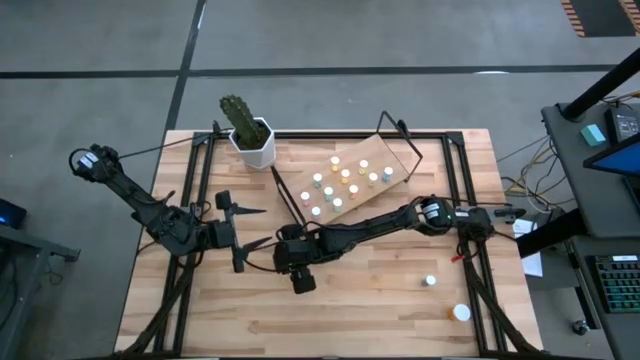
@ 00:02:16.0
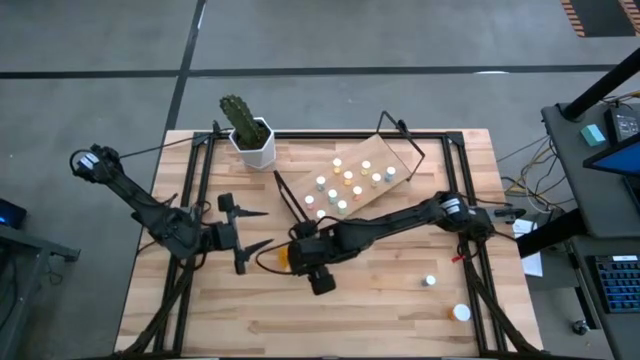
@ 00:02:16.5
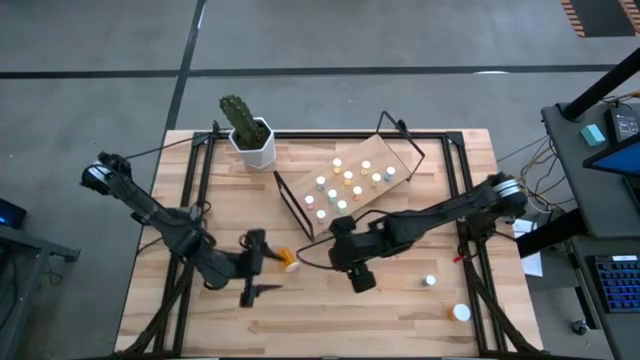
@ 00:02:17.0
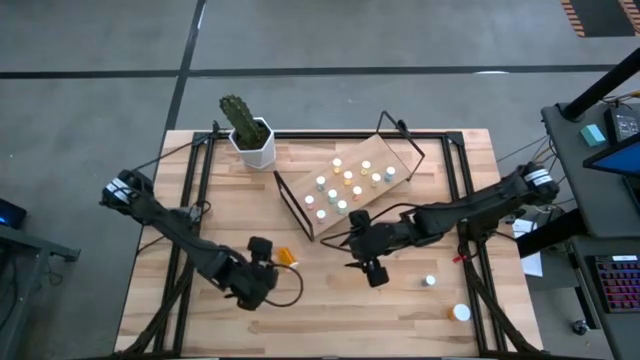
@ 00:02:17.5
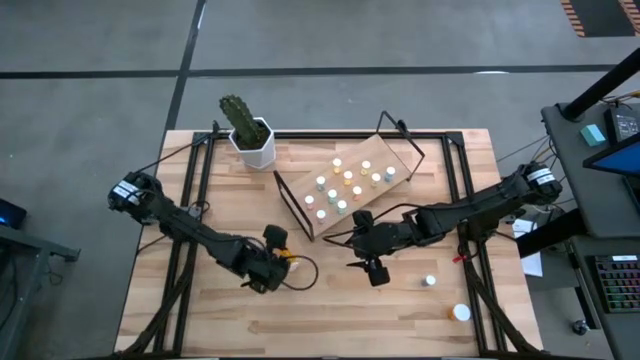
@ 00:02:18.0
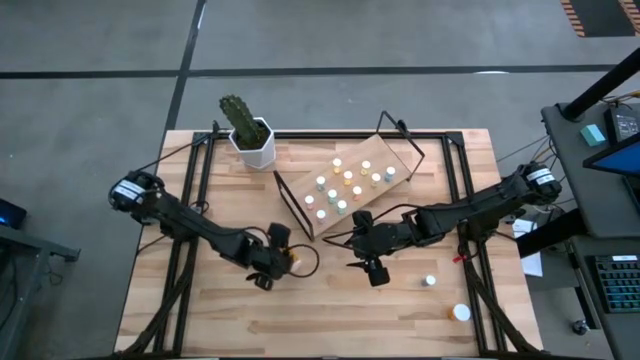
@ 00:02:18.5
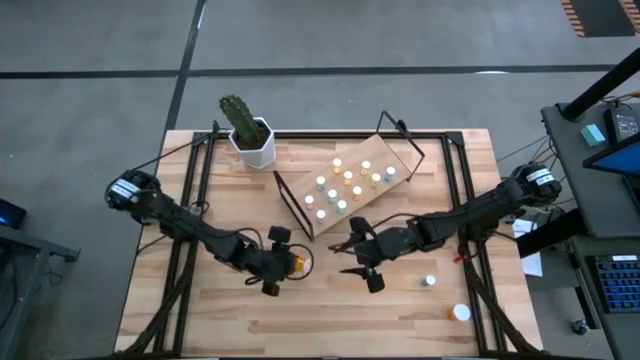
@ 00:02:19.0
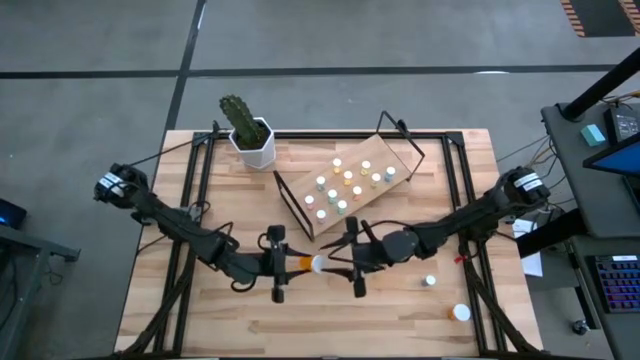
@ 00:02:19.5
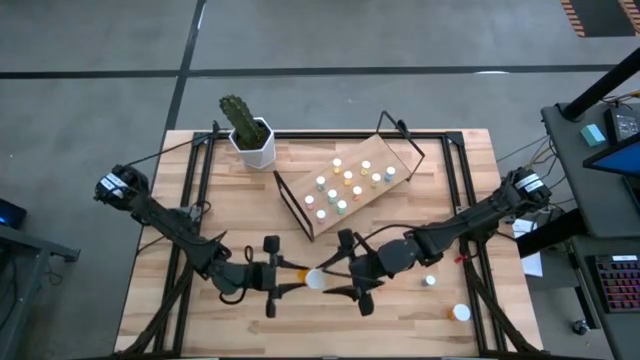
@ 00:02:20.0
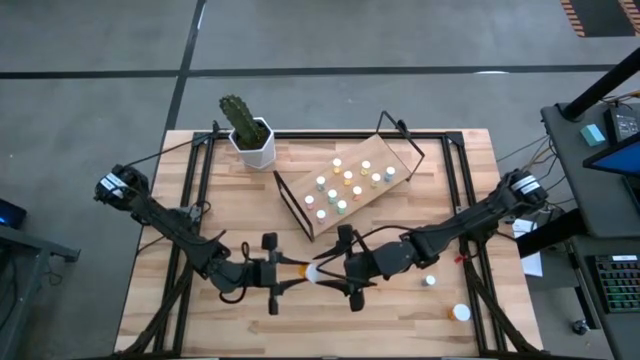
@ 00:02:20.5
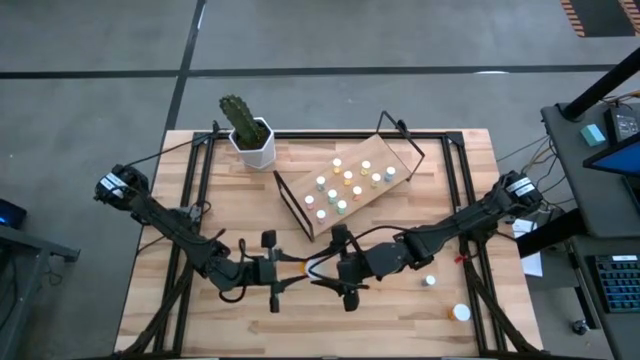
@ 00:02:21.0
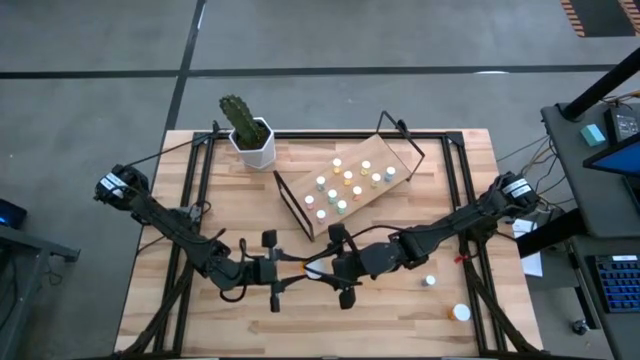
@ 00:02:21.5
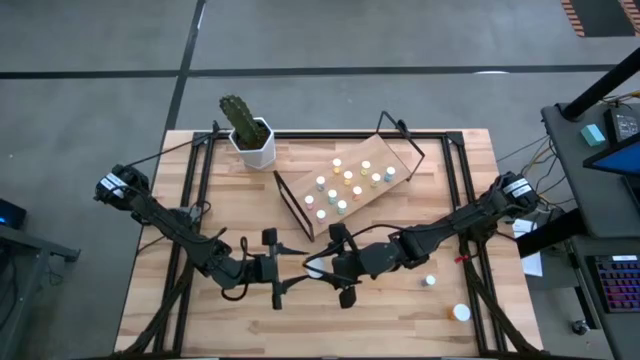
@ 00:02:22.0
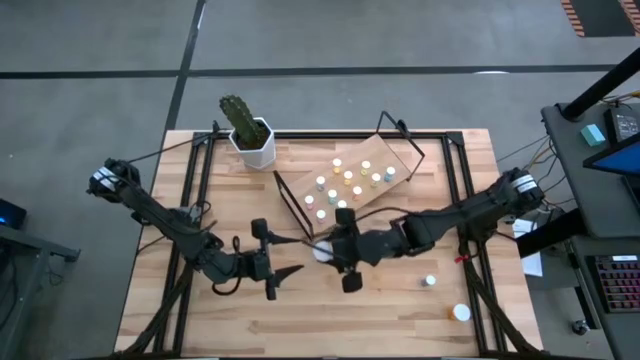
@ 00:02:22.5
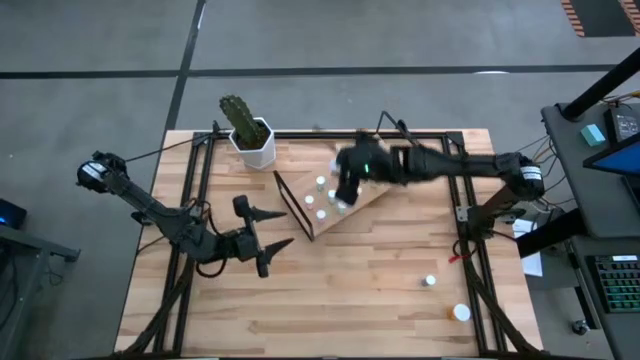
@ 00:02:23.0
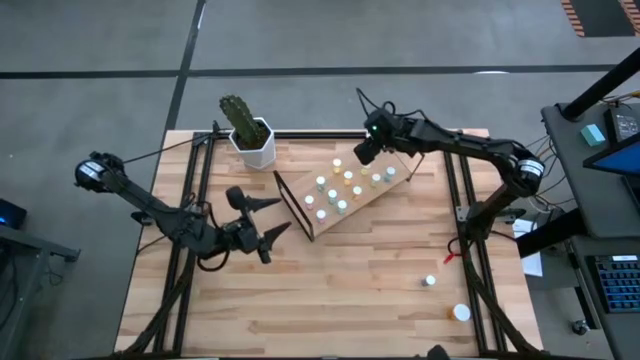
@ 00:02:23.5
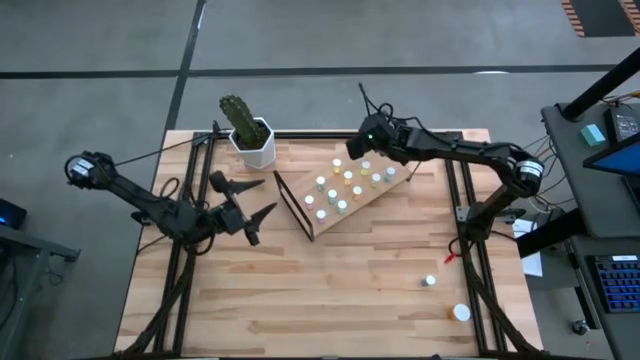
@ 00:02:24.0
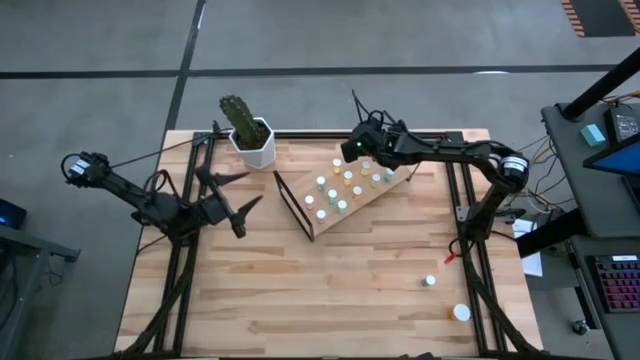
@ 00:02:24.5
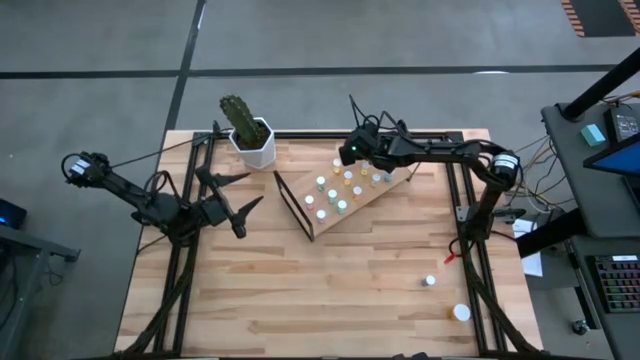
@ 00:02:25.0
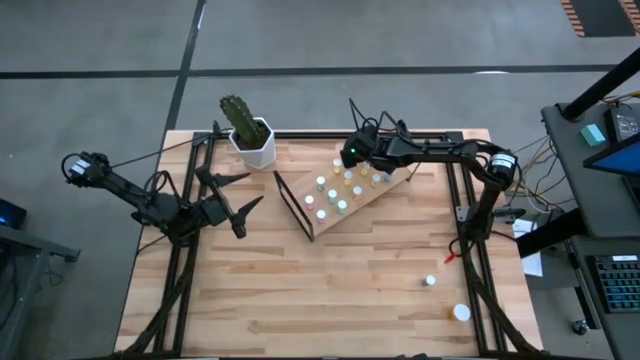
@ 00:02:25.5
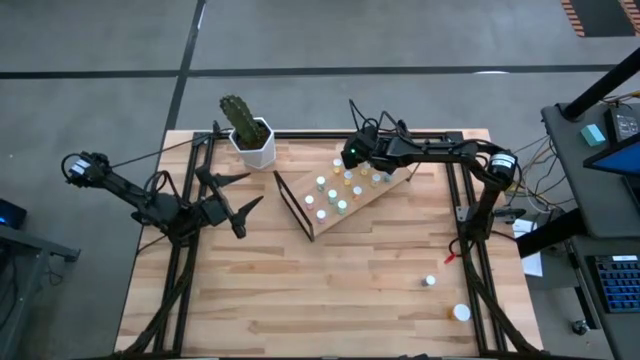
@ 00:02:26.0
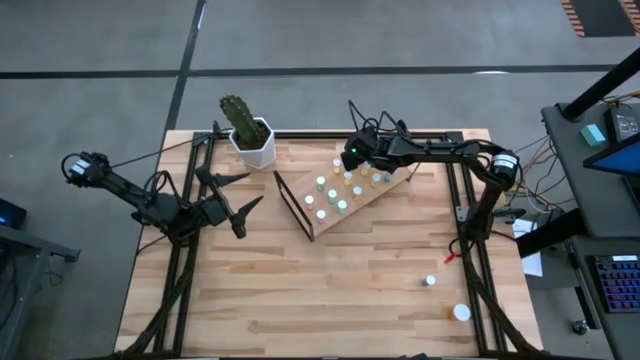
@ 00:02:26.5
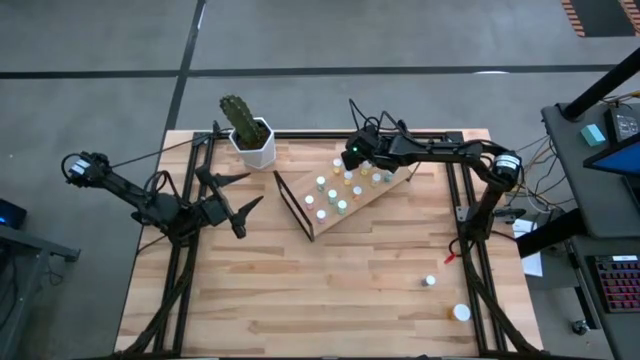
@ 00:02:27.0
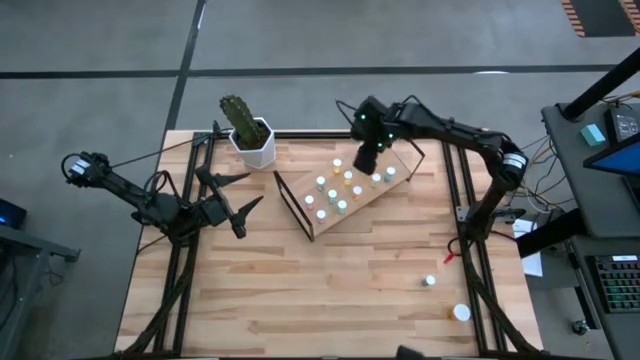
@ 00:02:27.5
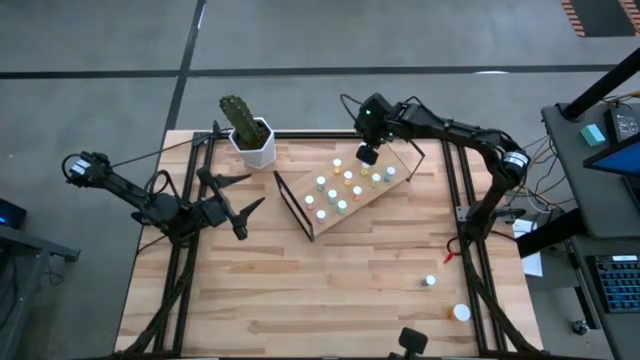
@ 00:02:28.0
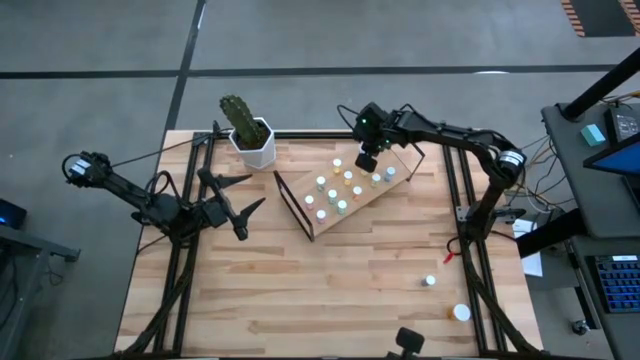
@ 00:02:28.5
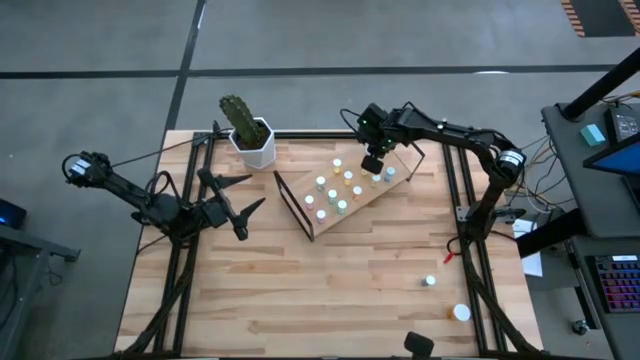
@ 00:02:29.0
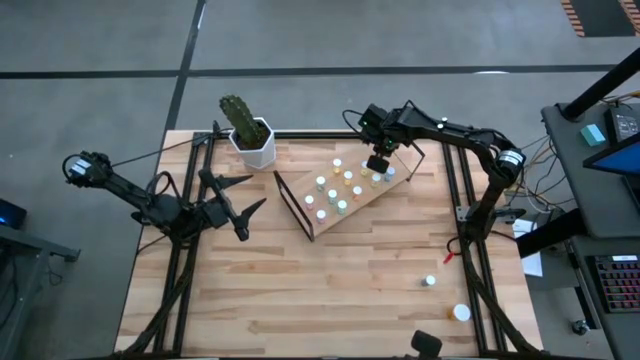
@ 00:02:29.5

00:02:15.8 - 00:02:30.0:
Task: Pick and place medicine bottles onto shelf by color
Put the orange pill bottle on the shelf

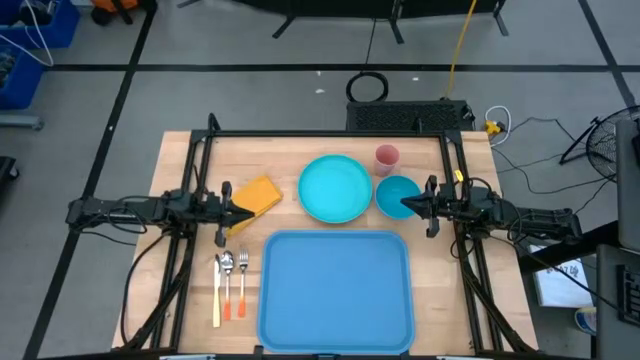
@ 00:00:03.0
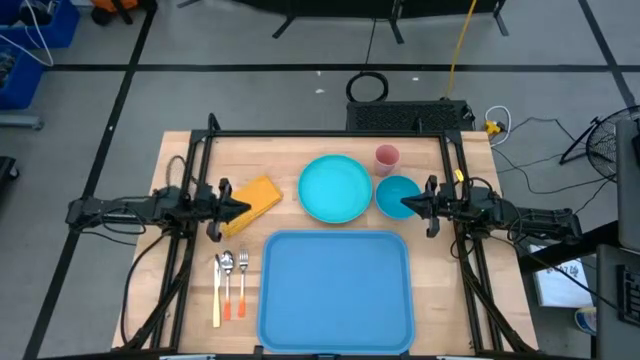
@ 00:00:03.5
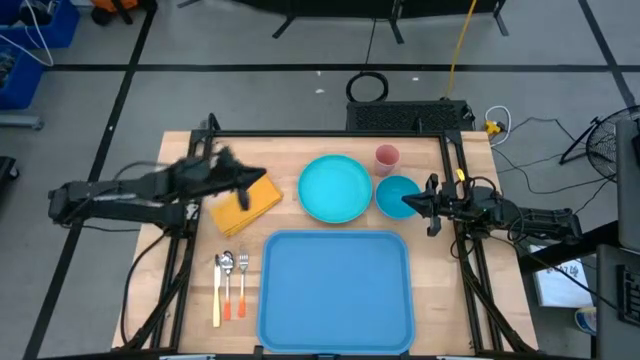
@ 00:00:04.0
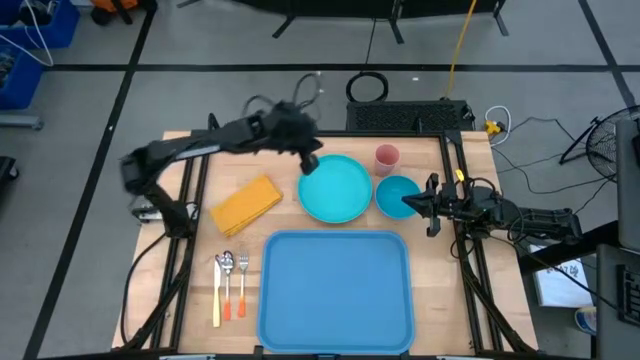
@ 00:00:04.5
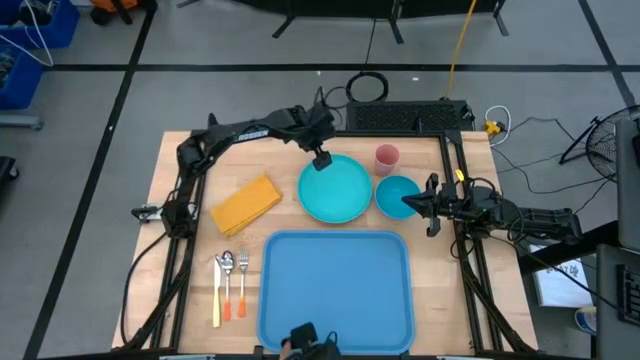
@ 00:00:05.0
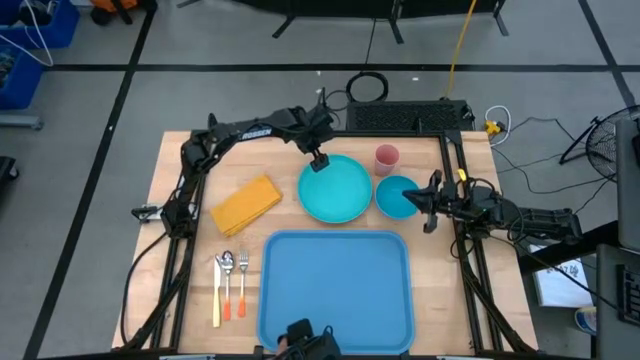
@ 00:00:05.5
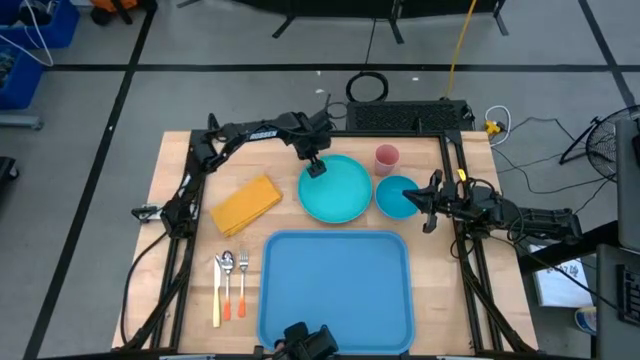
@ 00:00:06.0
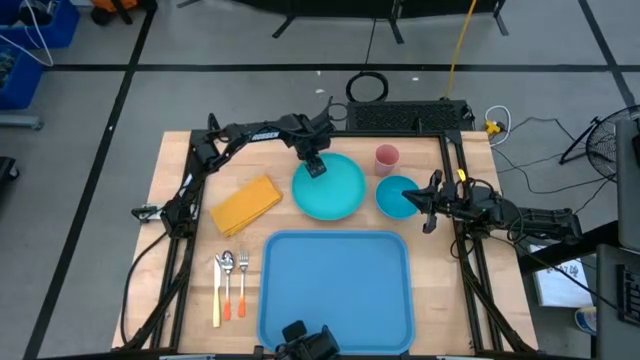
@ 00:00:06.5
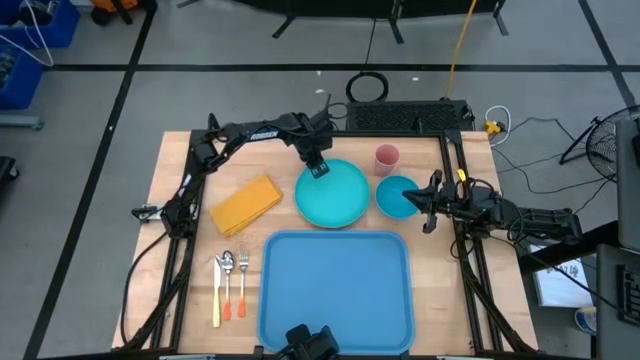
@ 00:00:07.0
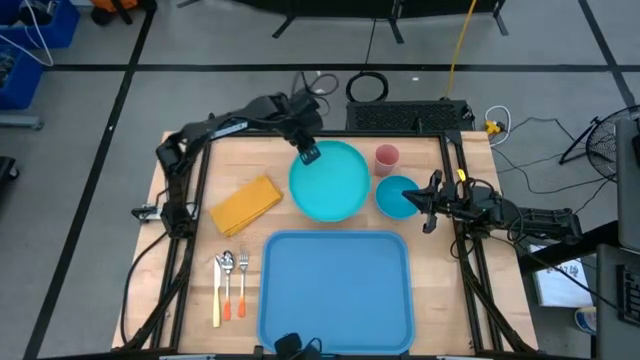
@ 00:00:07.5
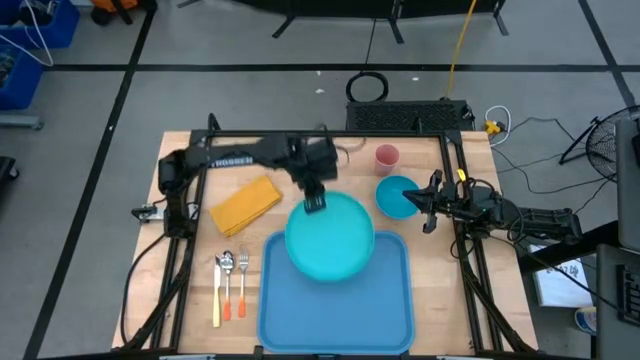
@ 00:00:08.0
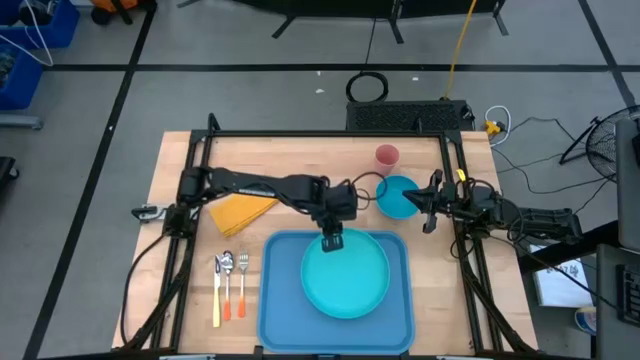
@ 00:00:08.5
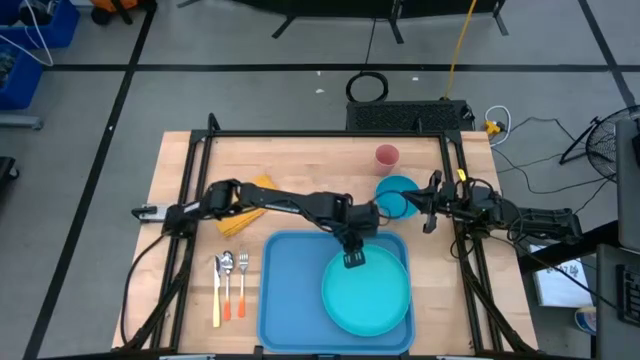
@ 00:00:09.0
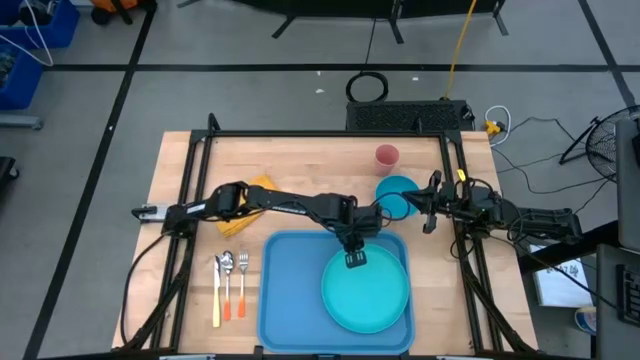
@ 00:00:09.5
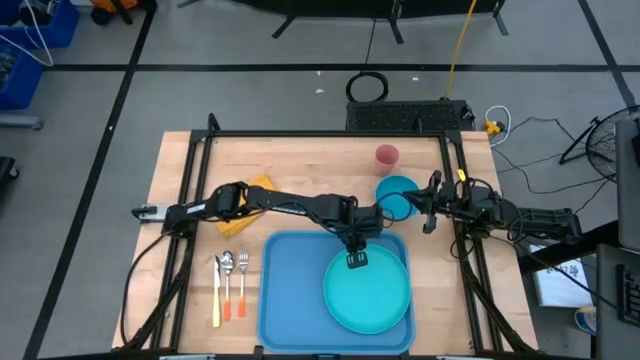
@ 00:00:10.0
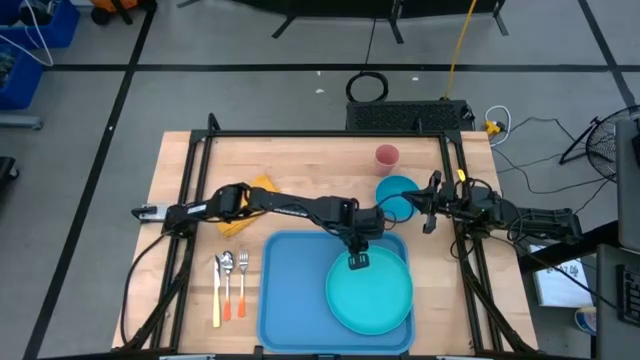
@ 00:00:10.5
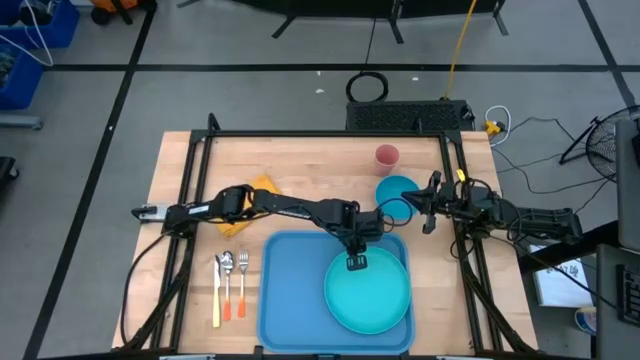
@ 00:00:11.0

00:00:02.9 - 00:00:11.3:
Task: Set up tray
Put the green plate on the left of the blue tray
